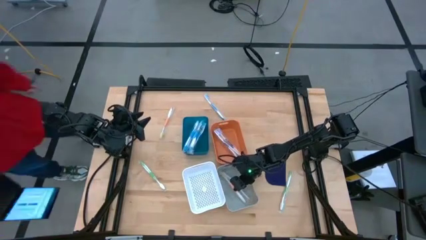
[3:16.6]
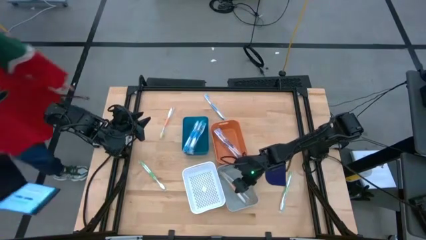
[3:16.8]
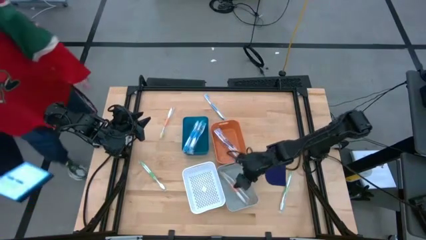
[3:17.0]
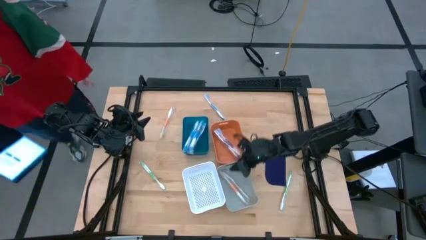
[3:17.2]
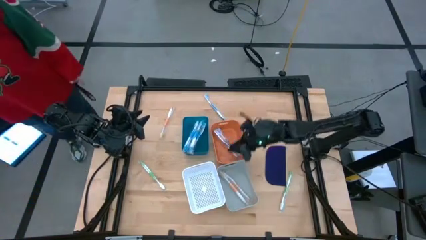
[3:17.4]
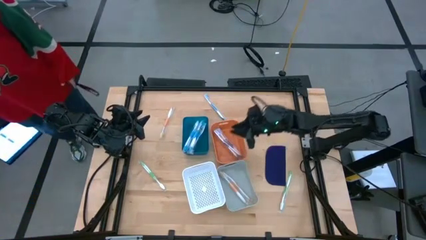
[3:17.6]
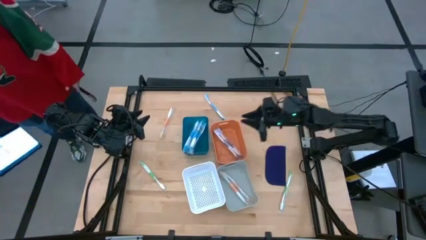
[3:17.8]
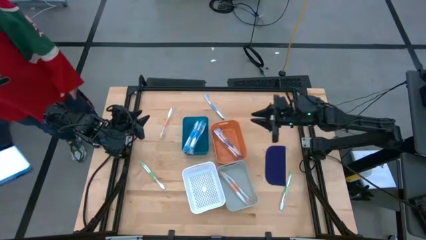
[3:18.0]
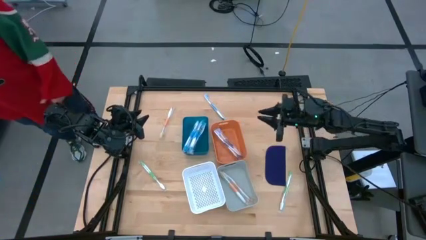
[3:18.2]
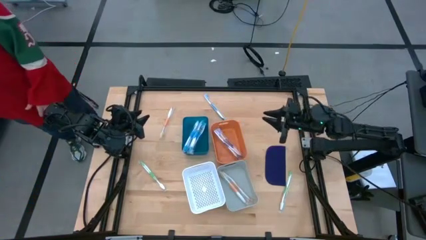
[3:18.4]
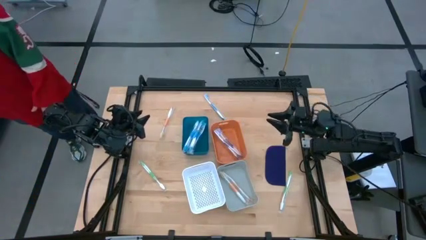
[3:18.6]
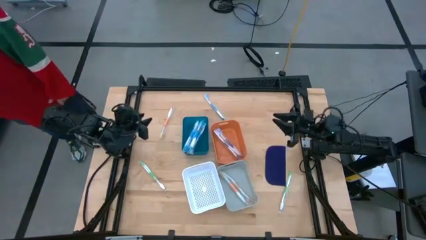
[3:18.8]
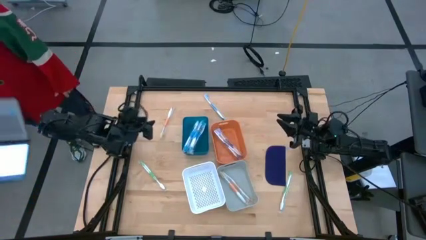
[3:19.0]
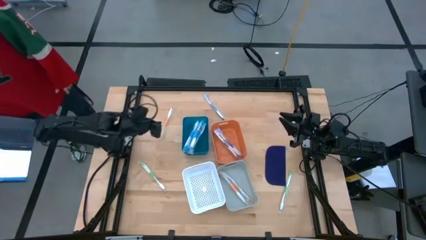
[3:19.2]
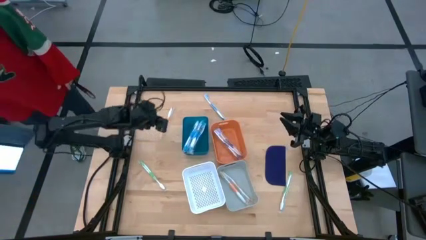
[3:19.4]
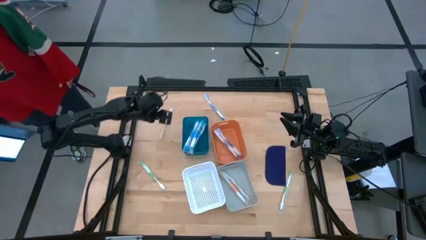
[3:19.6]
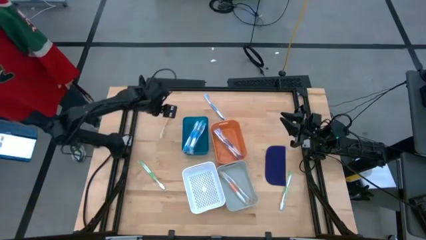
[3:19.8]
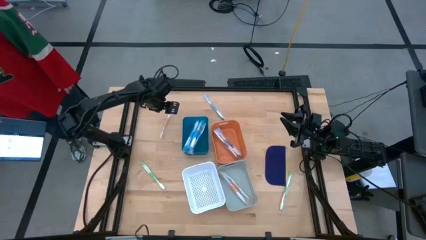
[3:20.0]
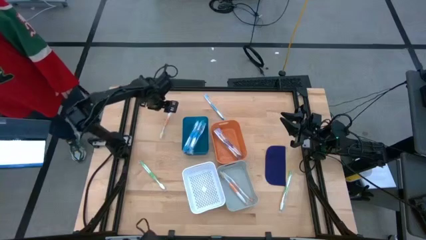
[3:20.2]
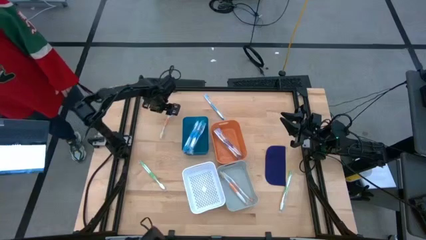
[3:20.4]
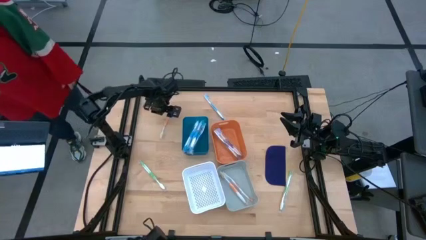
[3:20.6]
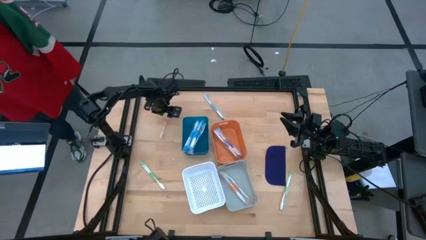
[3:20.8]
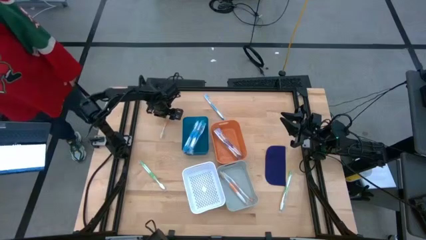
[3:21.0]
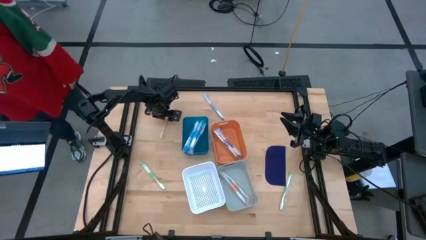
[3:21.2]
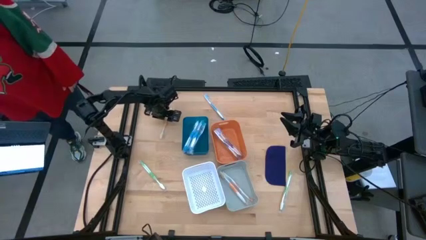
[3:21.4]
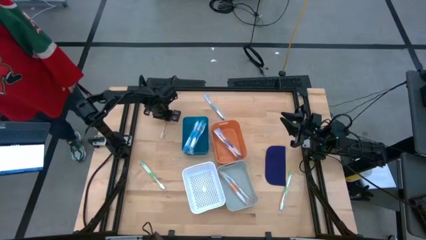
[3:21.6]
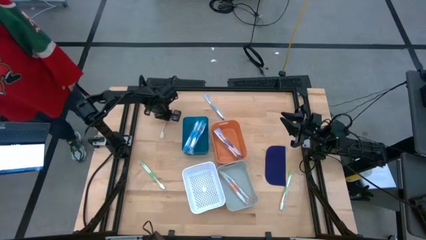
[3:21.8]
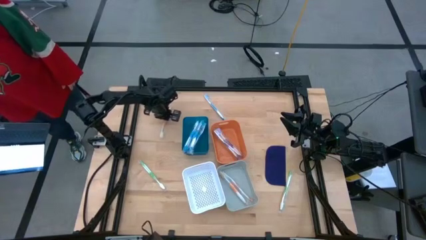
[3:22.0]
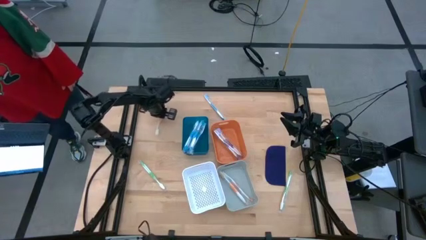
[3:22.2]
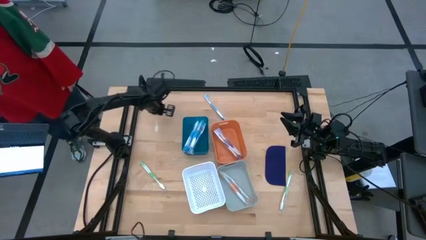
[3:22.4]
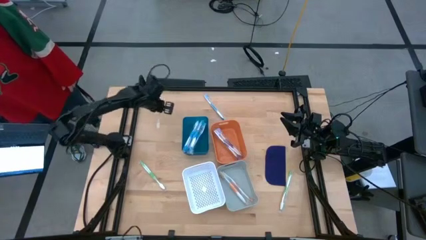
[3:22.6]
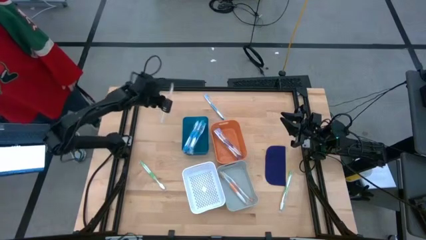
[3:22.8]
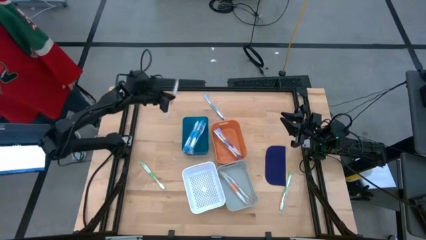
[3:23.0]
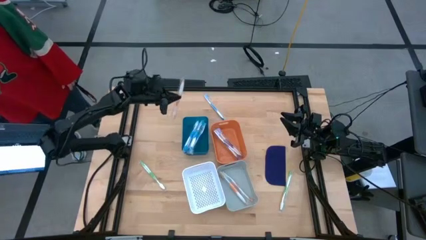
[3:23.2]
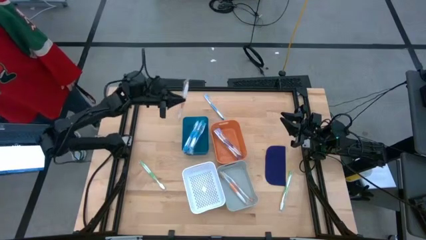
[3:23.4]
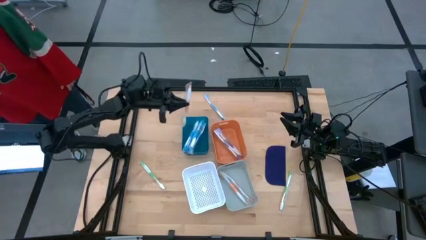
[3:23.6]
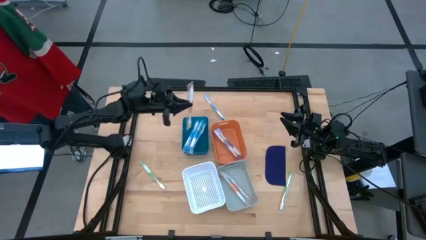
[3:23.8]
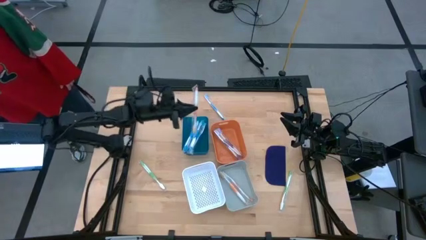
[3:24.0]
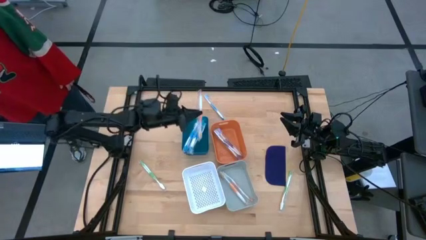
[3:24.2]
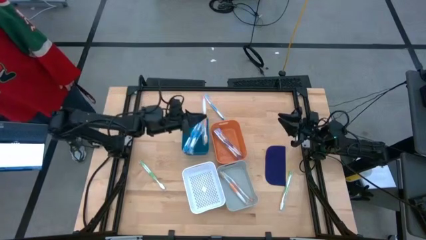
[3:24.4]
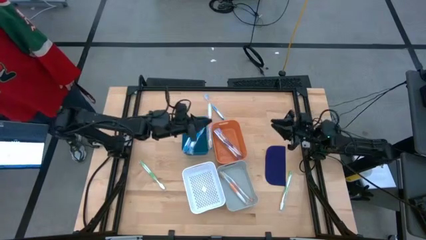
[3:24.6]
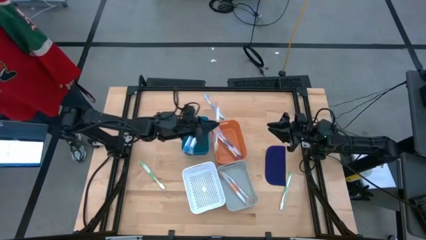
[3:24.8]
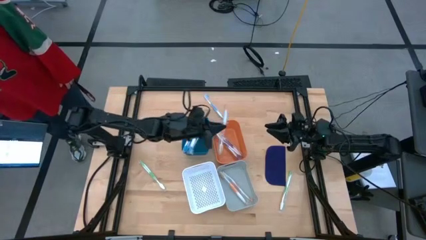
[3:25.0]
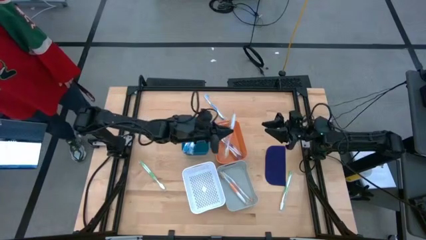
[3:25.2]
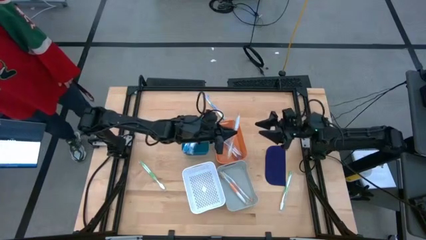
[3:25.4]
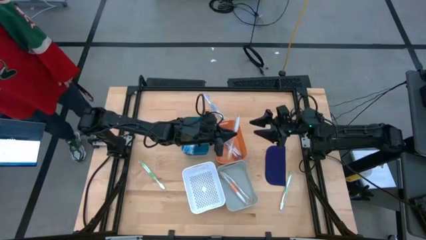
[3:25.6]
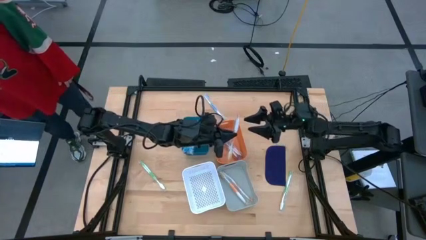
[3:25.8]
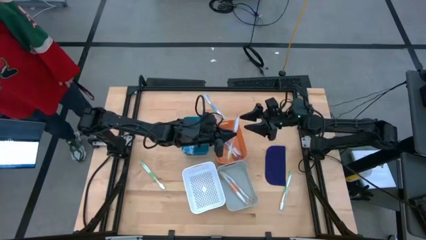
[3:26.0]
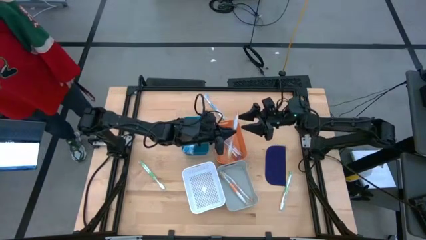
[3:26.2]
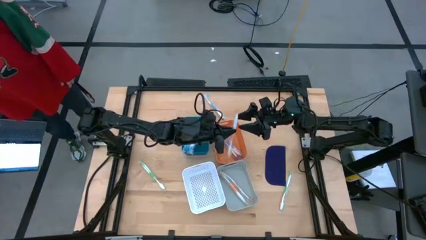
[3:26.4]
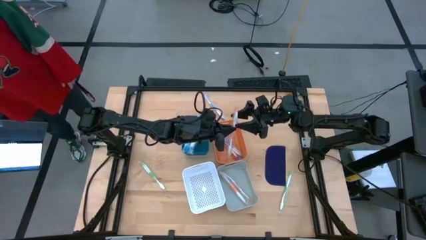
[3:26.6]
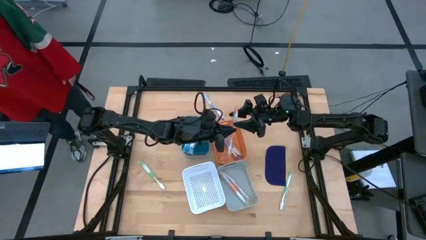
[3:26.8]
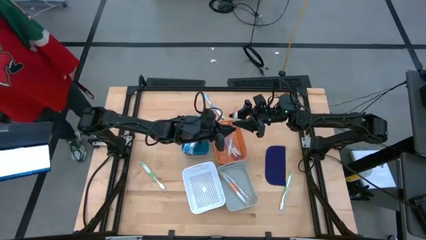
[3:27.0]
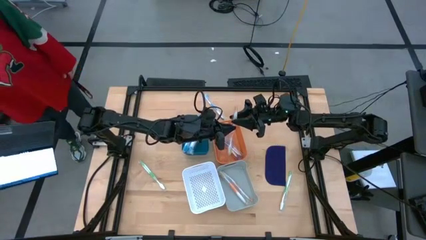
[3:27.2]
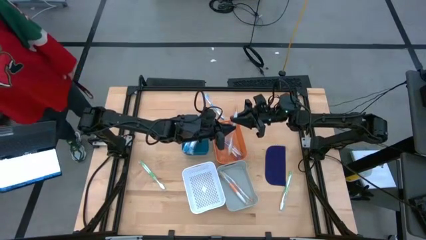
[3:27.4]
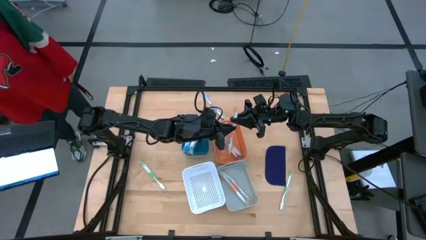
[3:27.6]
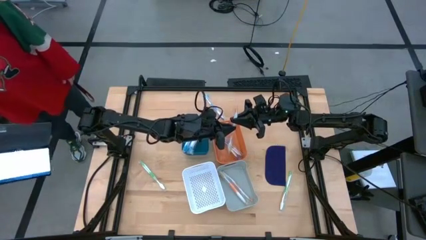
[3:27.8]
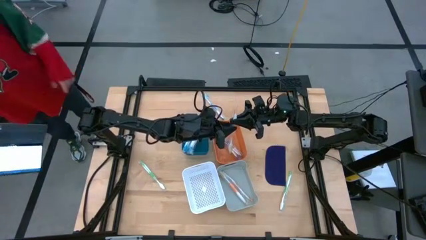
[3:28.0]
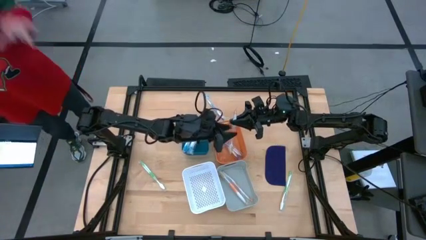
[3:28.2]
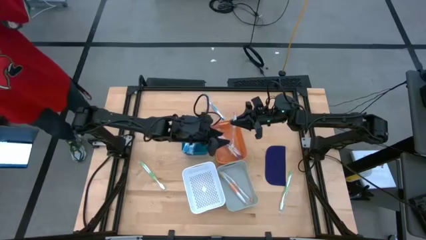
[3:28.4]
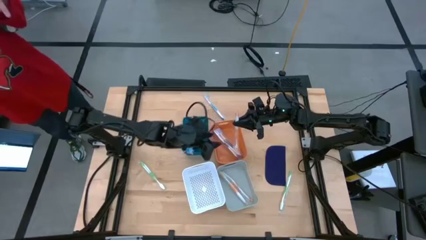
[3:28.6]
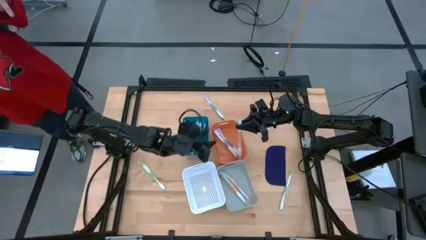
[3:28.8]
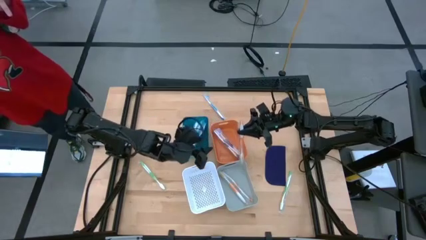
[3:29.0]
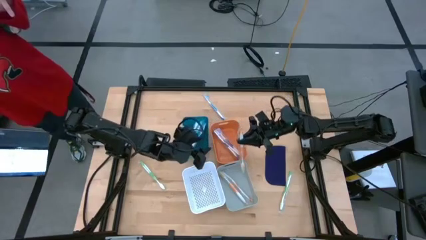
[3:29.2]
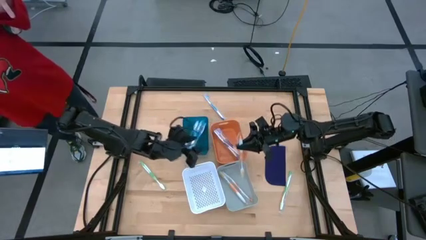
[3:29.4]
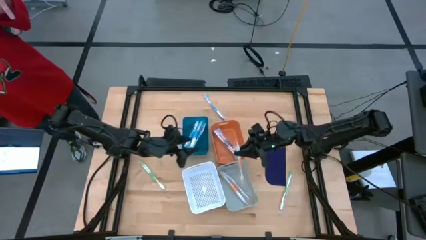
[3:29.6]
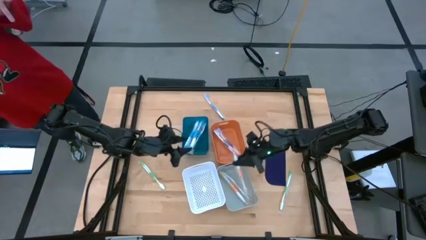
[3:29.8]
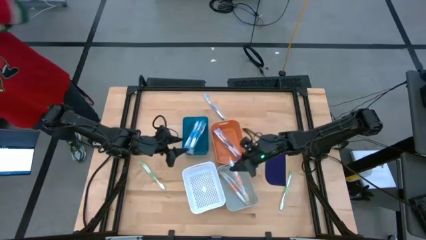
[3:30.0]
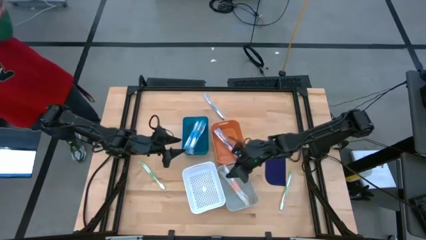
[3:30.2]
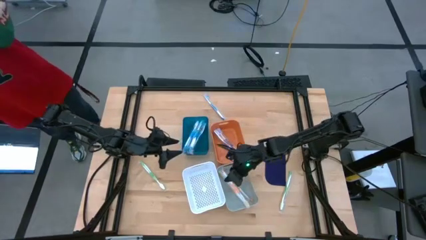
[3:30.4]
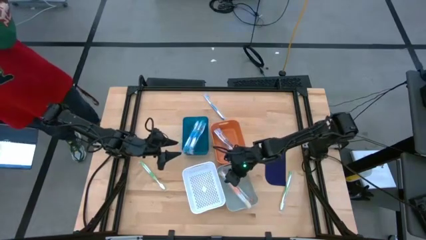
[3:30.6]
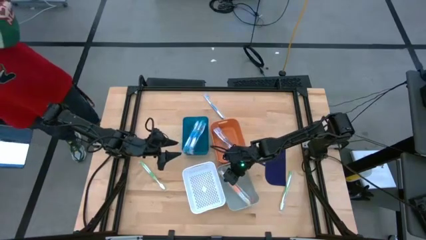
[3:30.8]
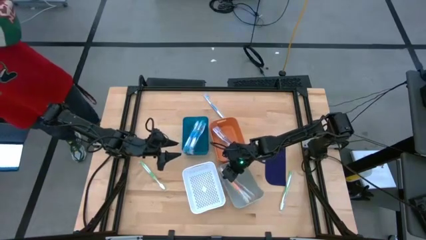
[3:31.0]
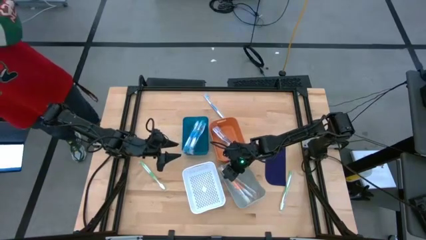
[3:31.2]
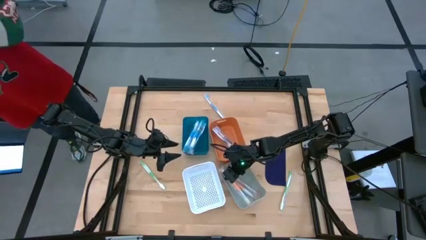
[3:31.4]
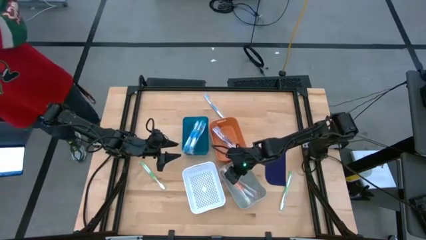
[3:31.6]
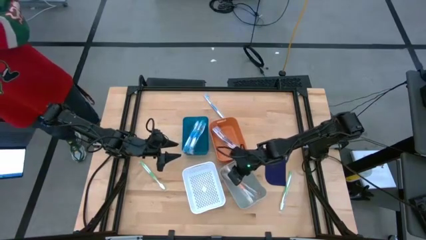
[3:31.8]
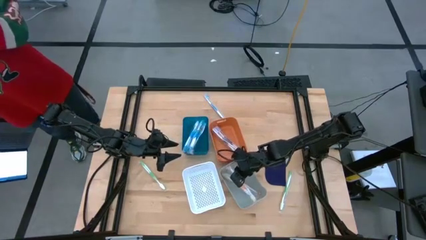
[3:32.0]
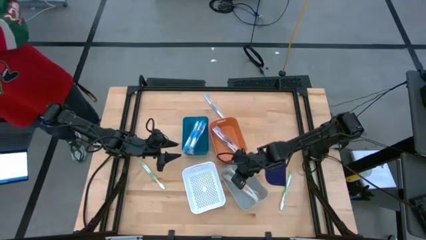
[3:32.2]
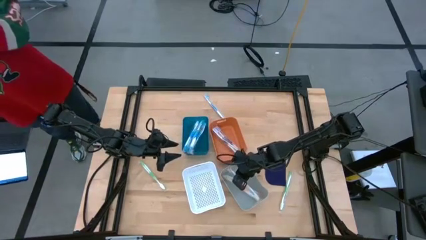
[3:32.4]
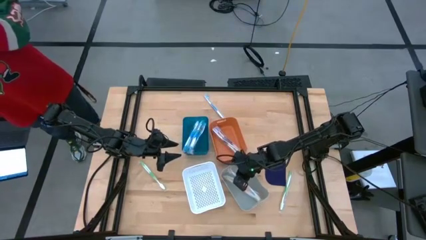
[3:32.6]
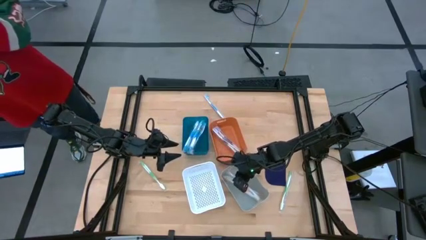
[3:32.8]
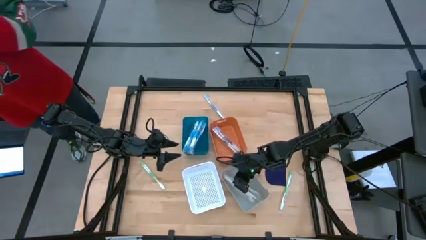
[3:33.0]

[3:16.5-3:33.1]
Task: Pick & Place Toothbrushes
Put the orange toothbrush into the gray bin

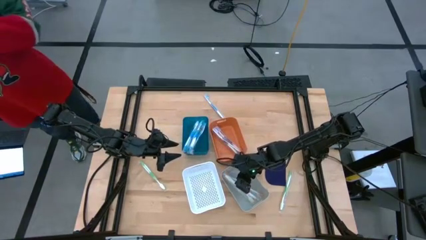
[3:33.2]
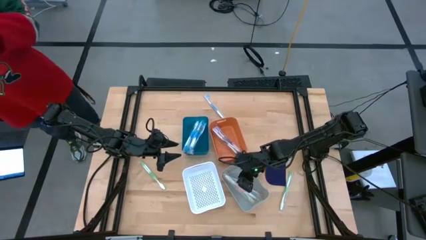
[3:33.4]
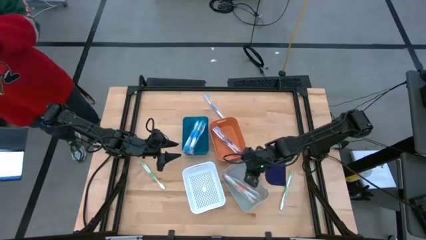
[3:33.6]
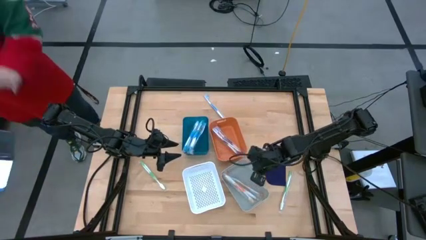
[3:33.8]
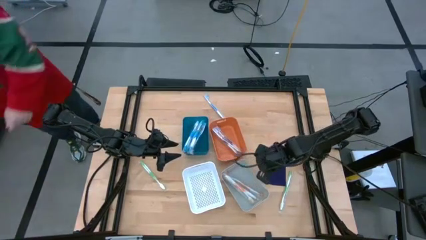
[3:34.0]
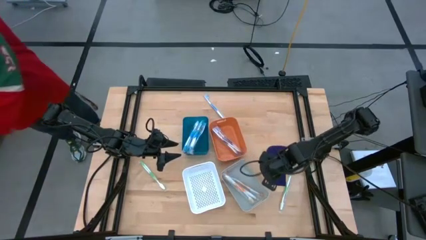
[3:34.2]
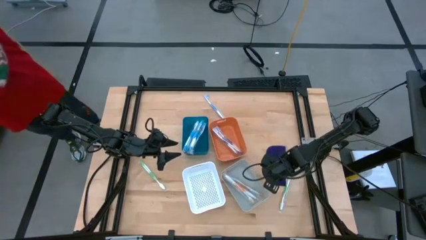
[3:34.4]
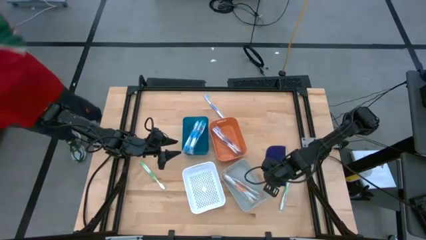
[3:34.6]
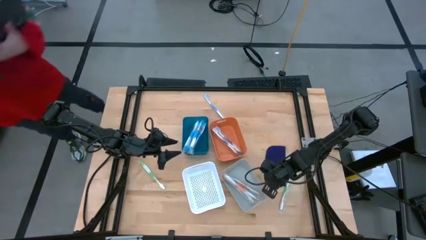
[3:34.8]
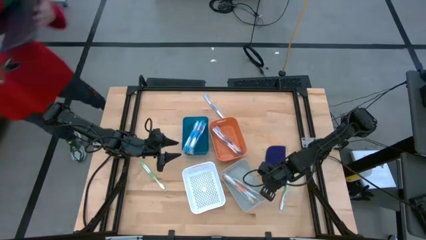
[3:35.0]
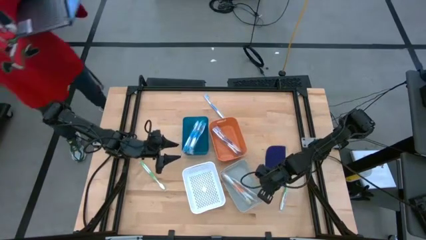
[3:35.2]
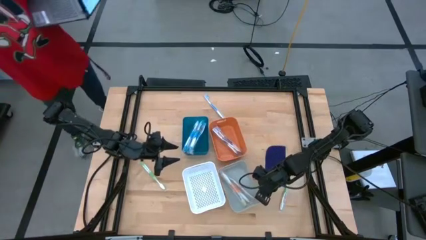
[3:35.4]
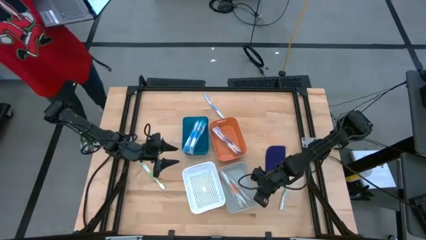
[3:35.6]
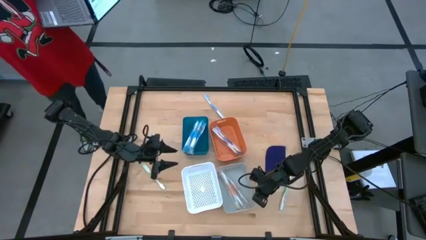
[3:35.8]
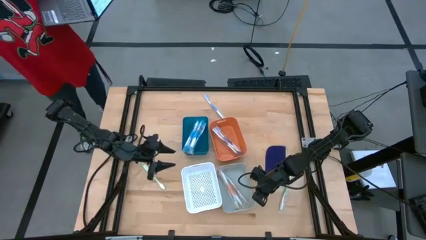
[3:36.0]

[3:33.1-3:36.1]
Adjust the gray bin on the table
